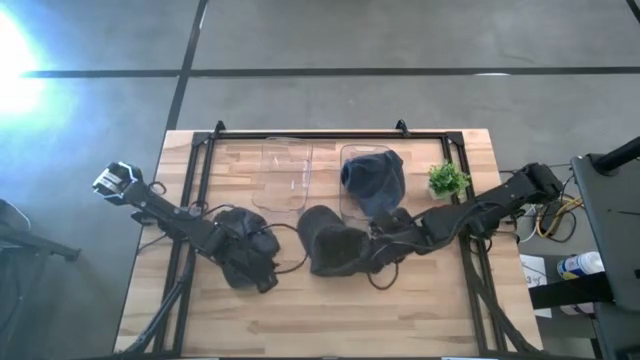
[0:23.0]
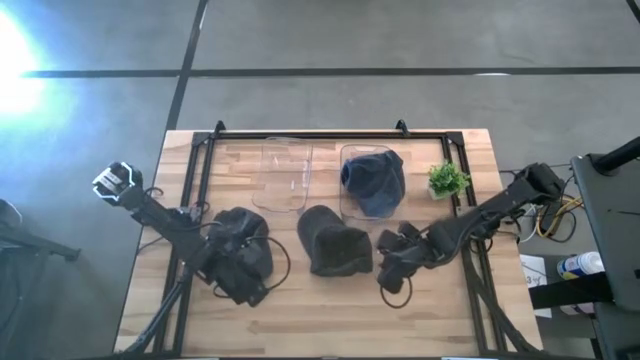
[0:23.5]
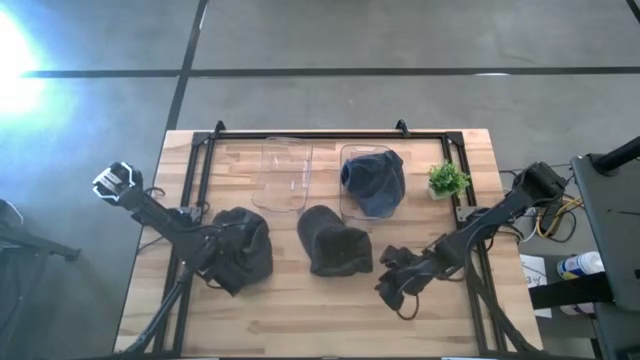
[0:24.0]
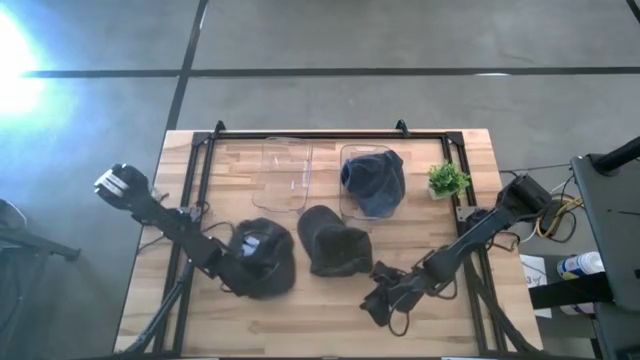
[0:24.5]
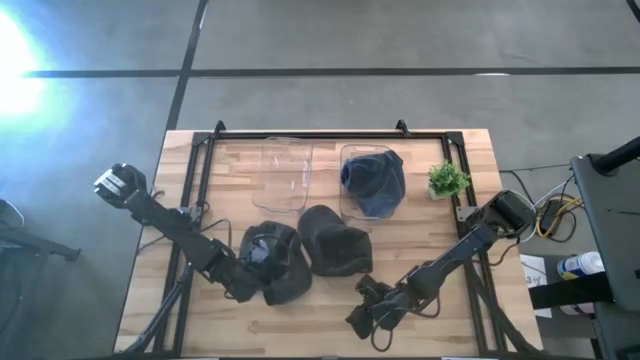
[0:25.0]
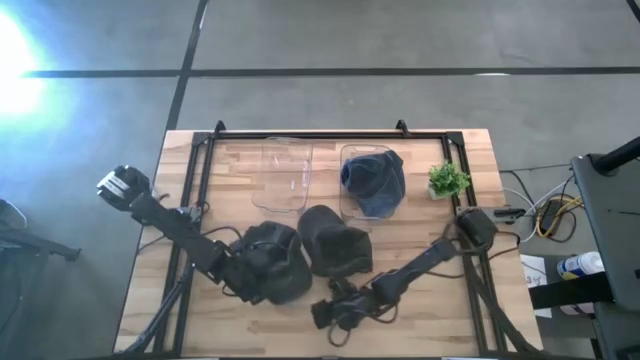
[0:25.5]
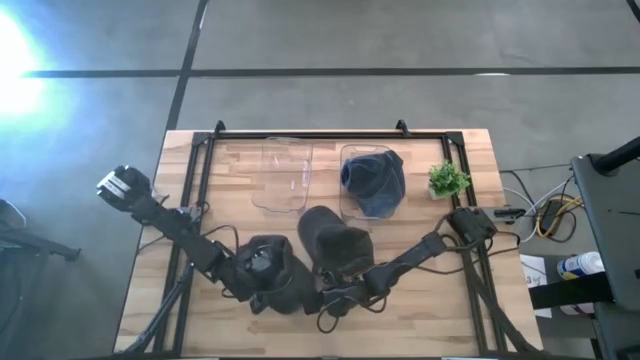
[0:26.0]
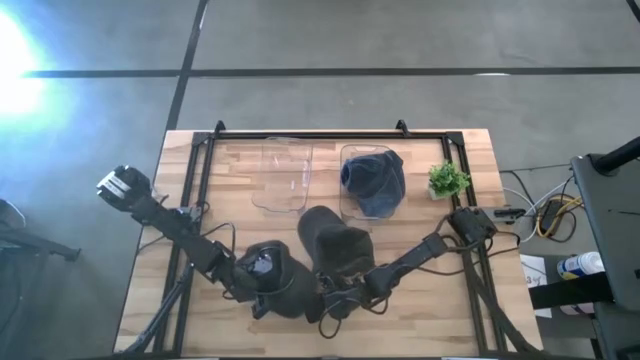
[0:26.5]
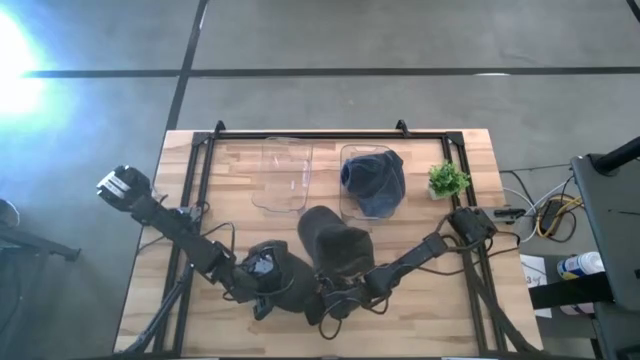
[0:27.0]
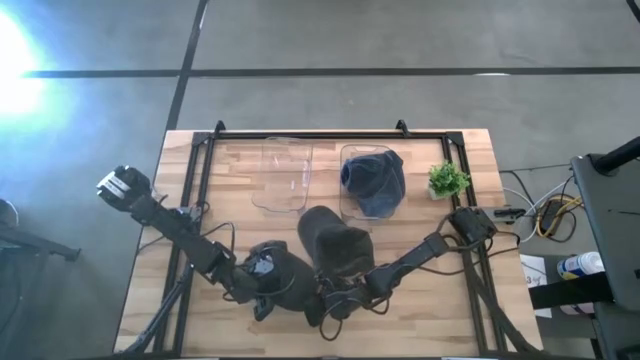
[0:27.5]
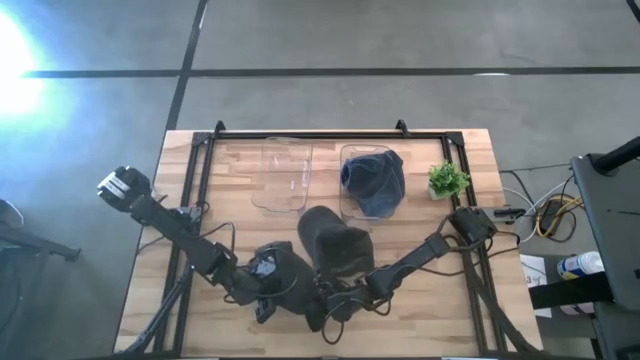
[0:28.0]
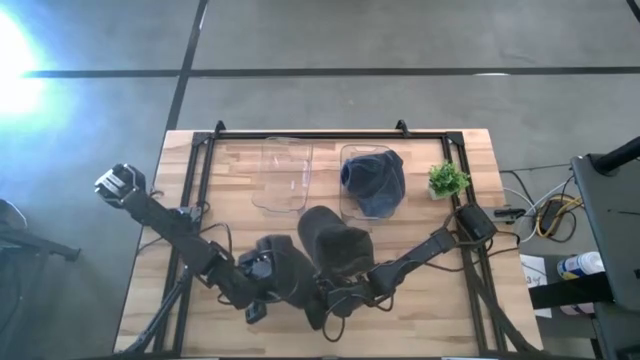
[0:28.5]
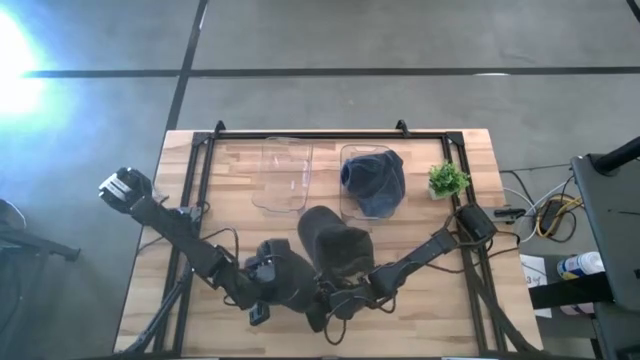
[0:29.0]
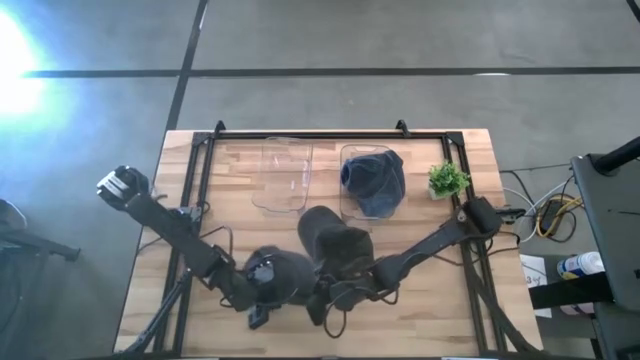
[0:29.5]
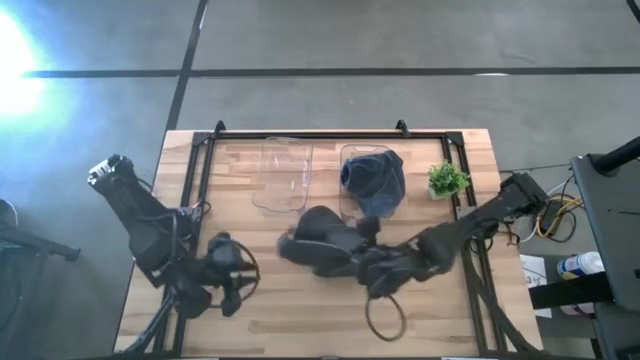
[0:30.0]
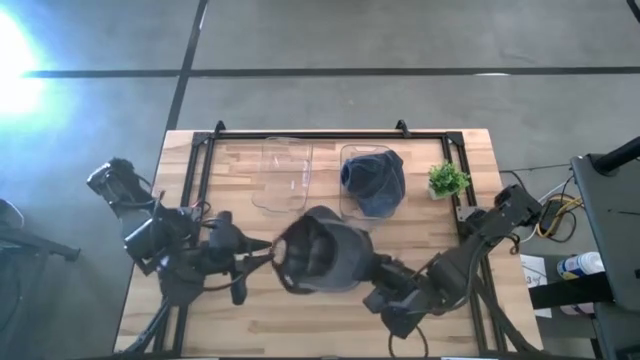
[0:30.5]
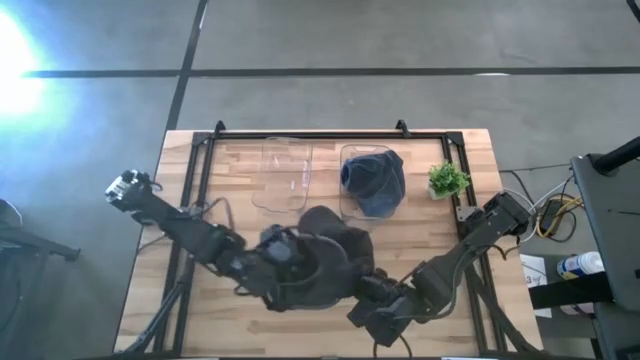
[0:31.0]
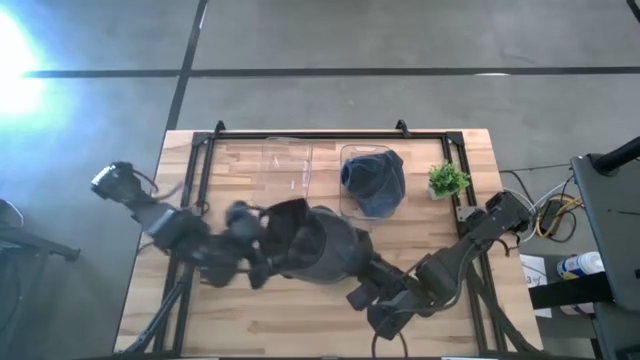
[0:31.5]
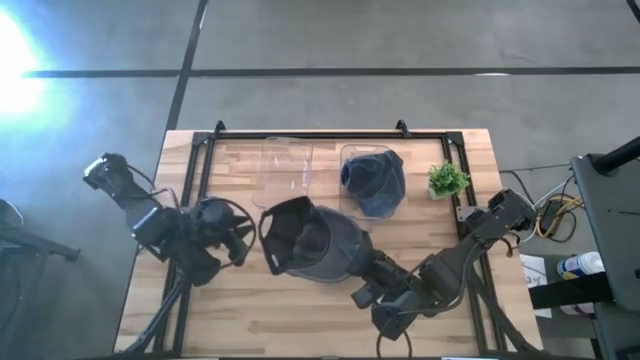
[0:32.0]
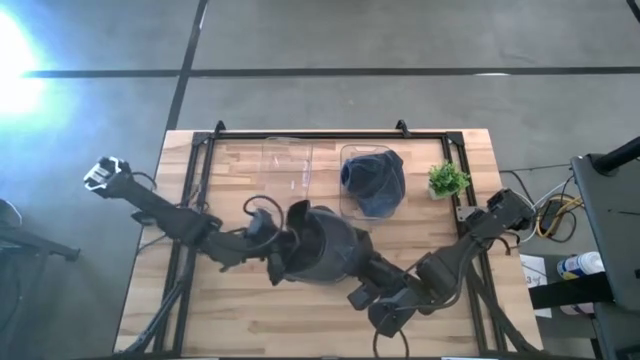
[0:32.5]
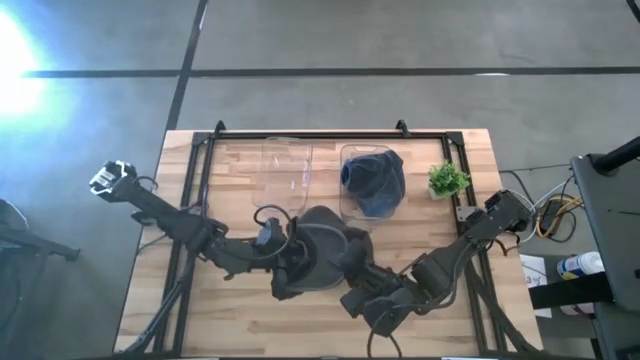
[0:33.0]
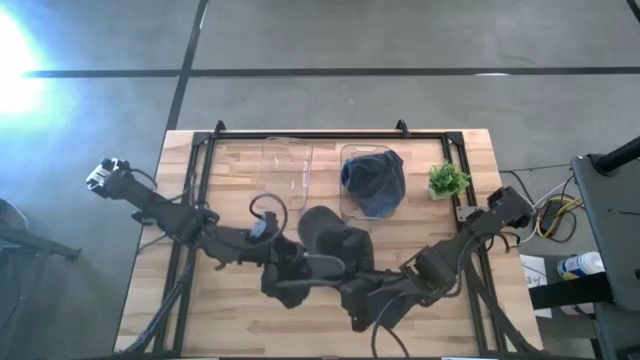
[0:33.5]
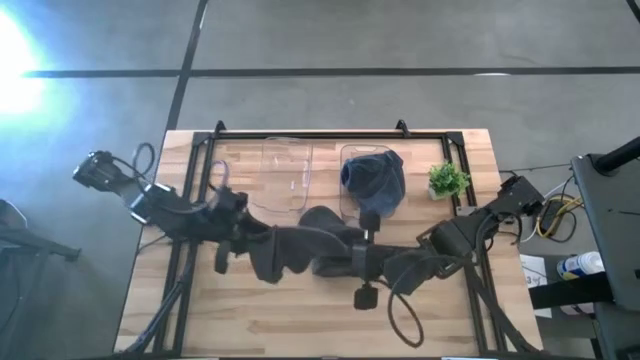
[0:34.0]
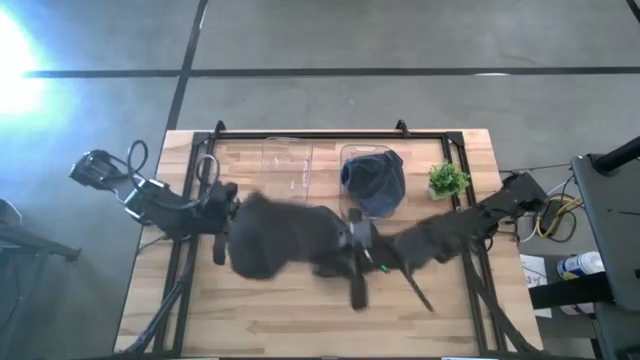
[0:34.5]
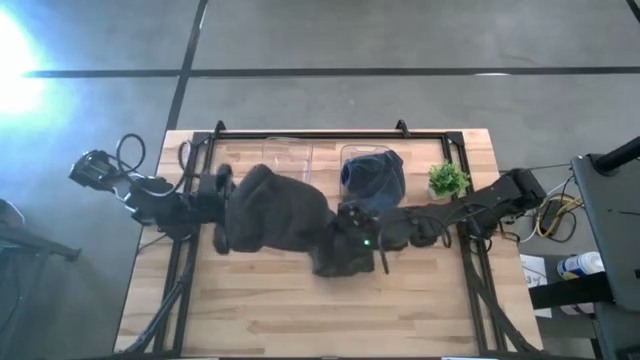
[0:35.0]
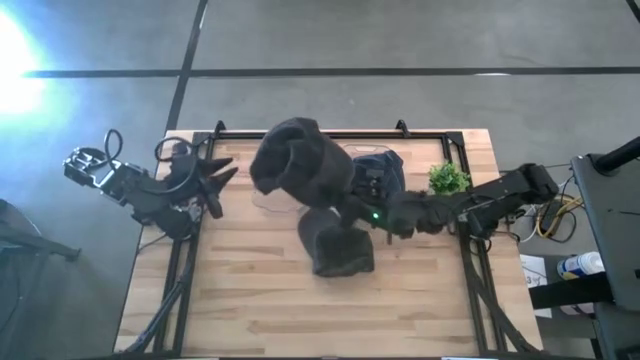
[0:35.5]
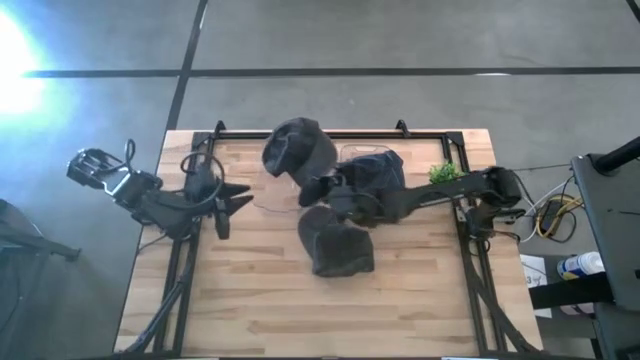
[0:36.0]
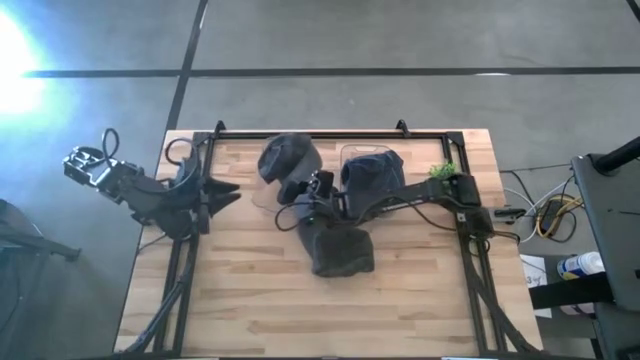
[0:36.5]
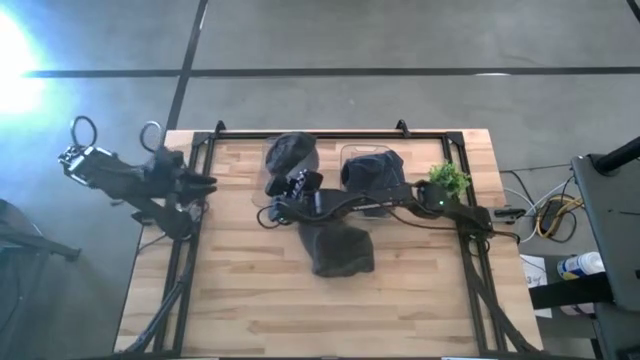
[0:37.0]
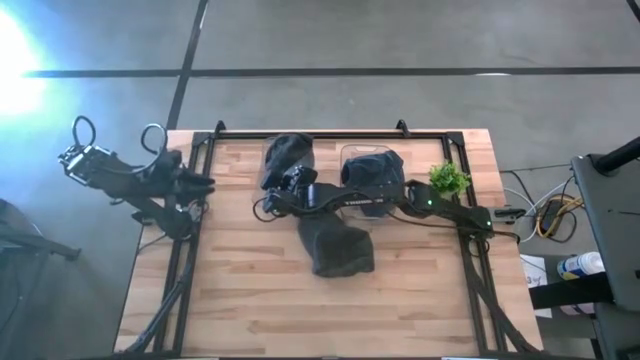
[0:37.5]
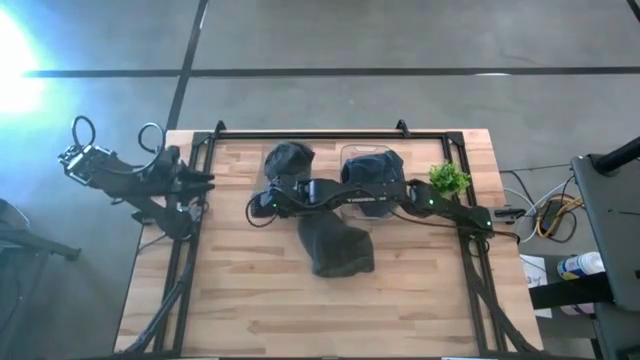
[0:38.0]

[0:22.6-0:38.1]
Task: Pick & Place hat
Put the left black cap into the left transparent bin

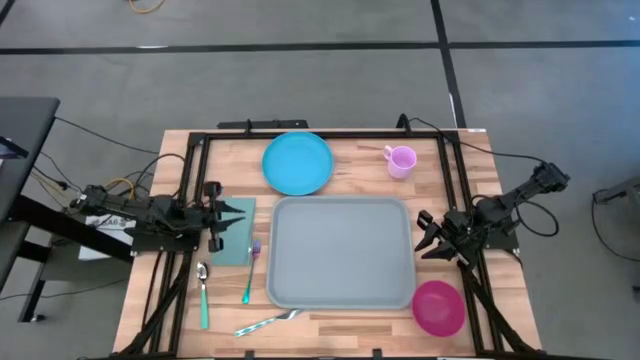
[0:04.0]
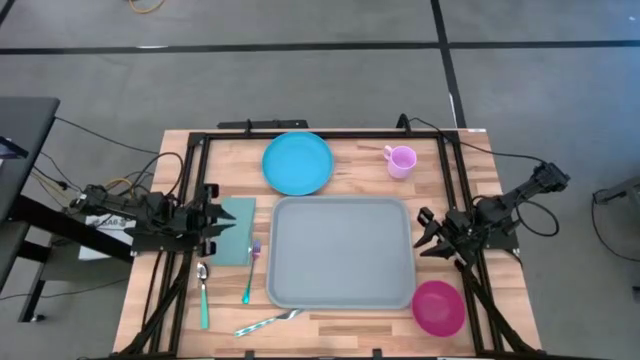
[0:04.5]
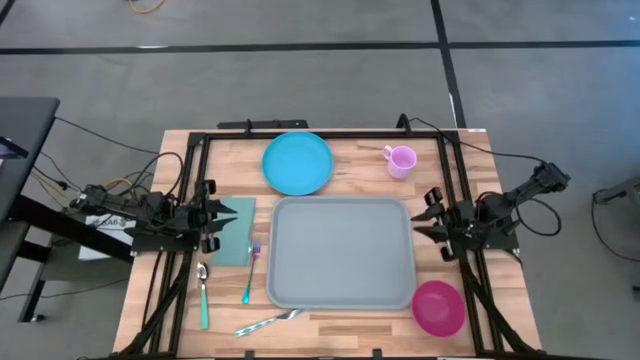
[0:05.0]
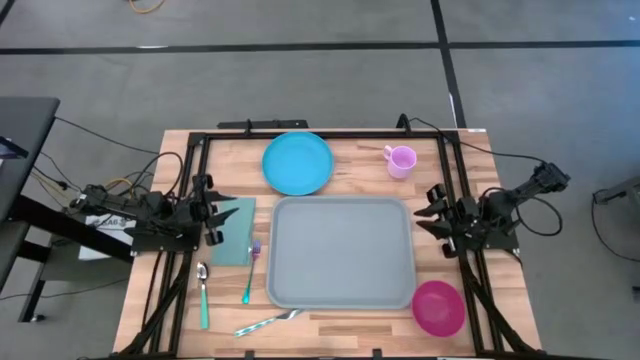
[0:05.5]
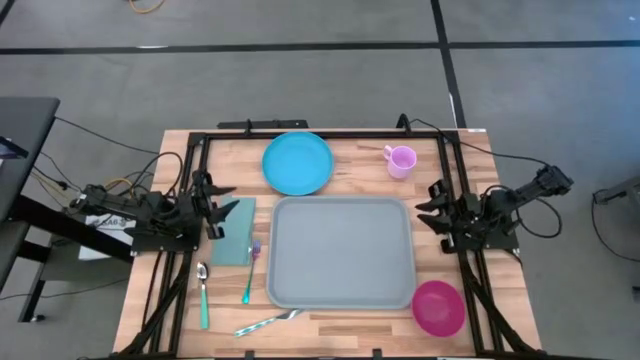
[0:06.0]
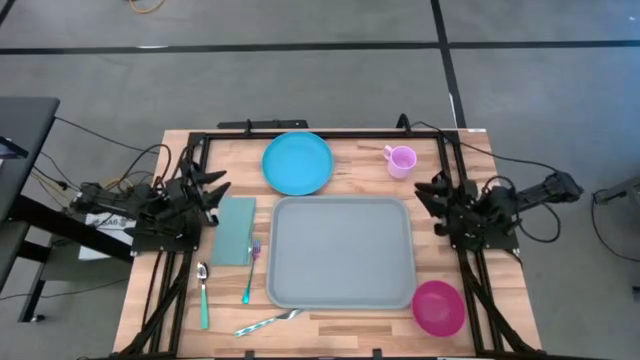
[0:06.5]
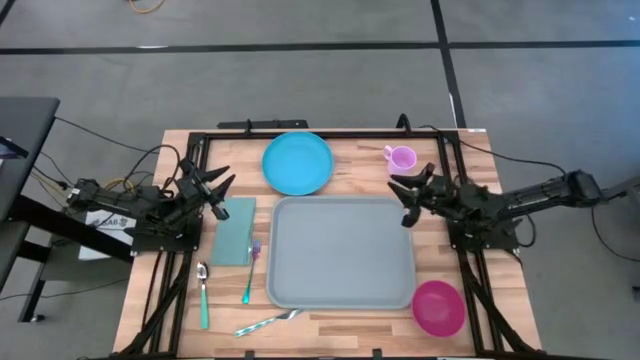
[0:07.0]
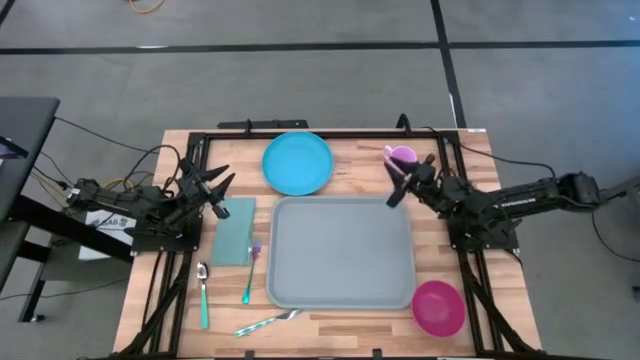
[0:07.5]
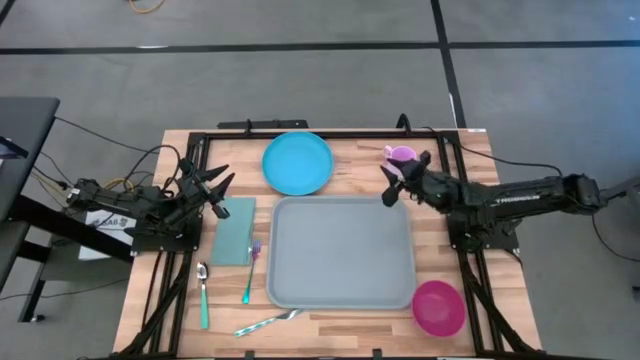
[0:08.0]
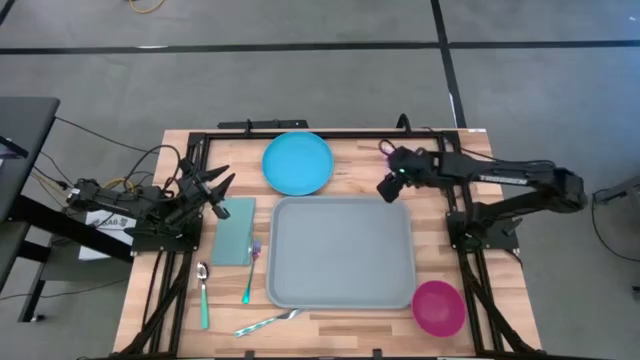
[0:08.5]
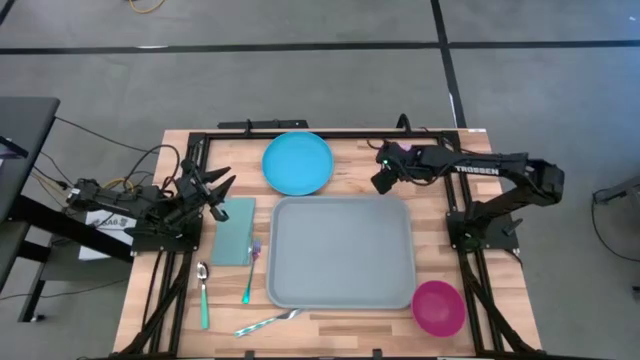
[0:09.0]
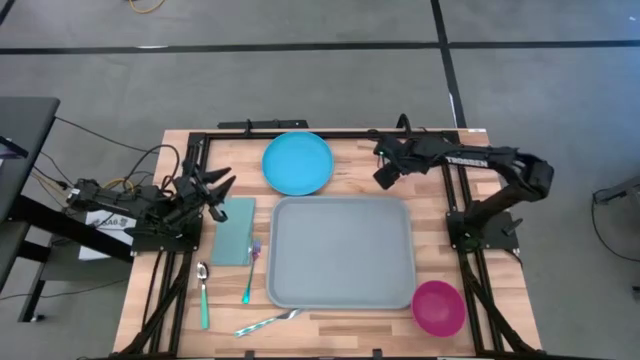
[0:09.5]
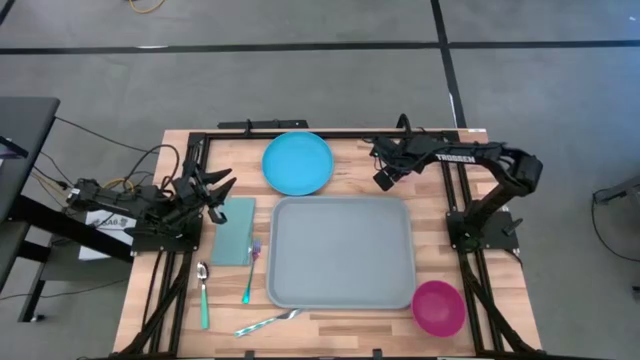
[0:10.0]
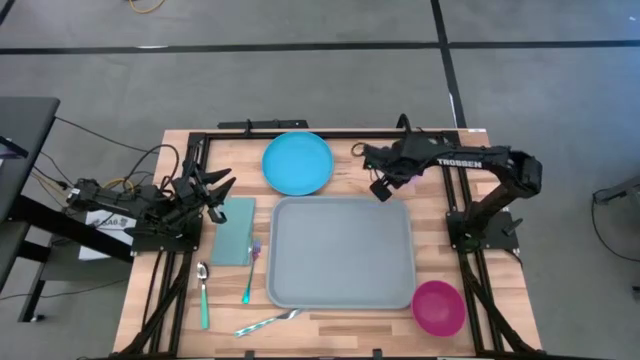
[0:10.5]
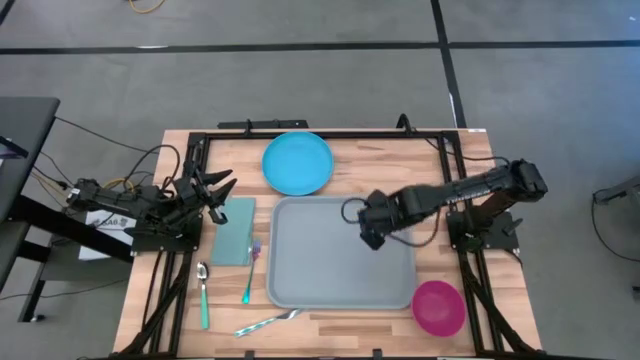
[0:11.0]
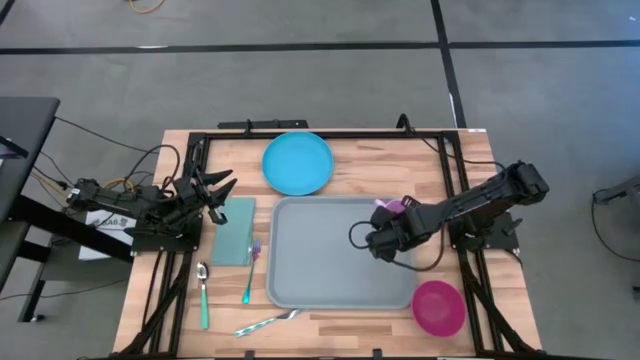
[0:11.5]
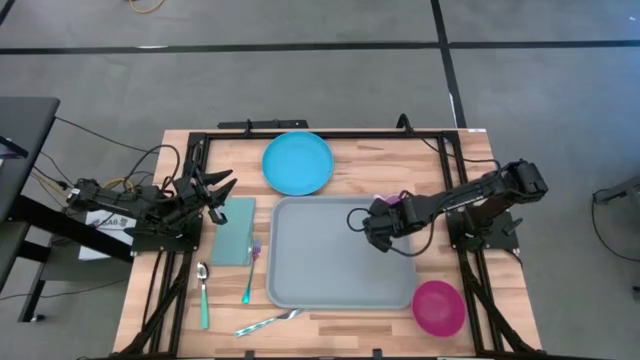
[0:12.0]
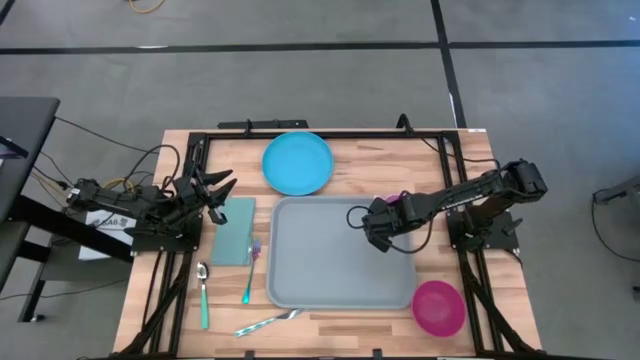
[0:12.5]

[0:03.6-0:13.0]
Task: Set up tray
Put the pink mug on the gray serving tray
